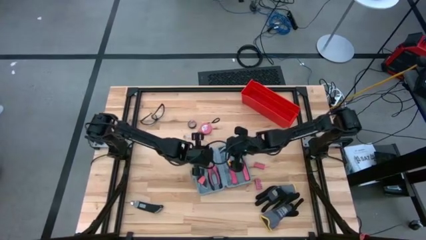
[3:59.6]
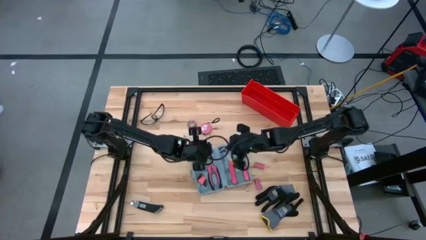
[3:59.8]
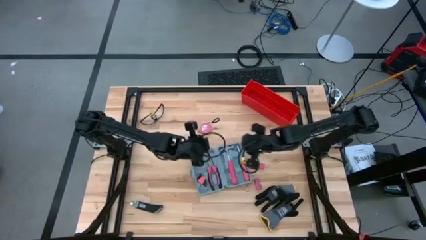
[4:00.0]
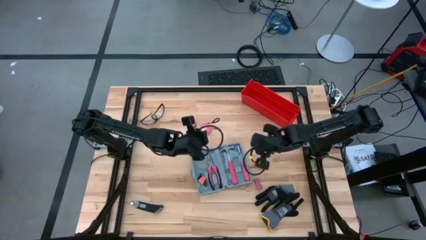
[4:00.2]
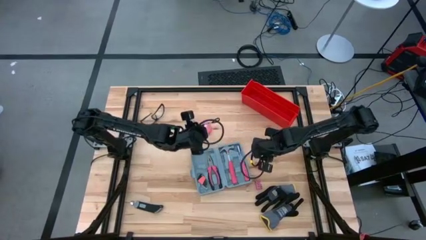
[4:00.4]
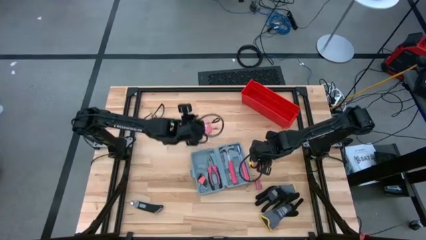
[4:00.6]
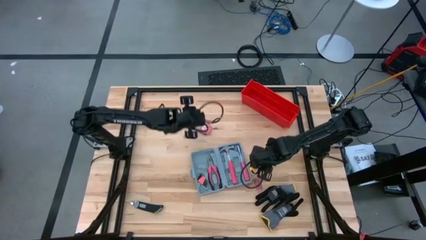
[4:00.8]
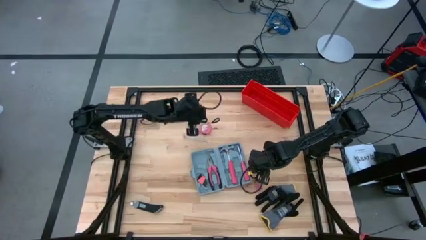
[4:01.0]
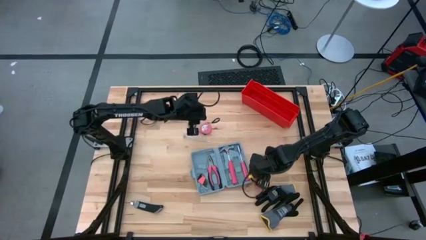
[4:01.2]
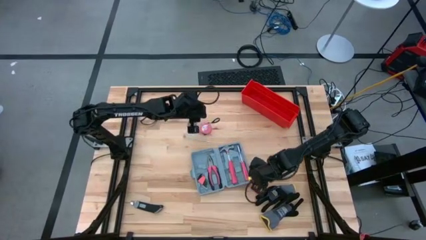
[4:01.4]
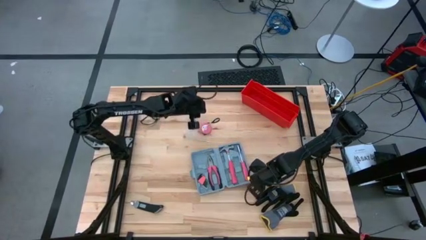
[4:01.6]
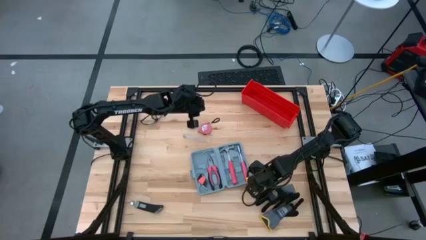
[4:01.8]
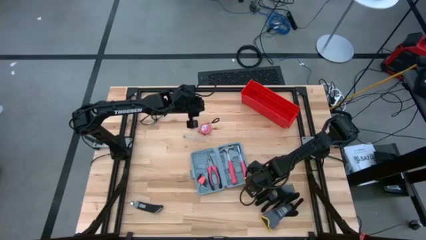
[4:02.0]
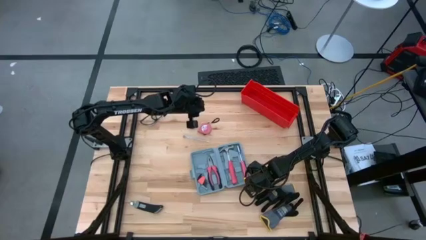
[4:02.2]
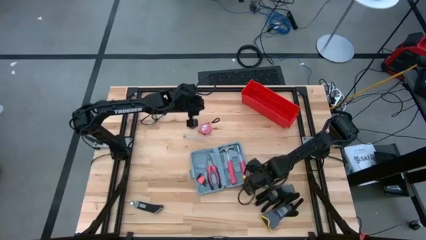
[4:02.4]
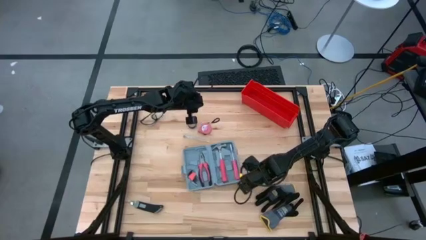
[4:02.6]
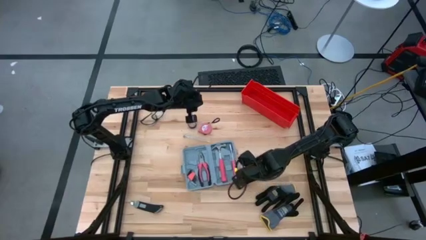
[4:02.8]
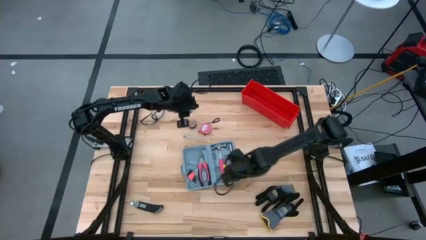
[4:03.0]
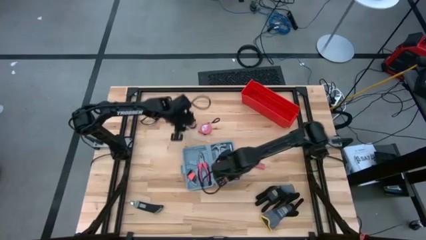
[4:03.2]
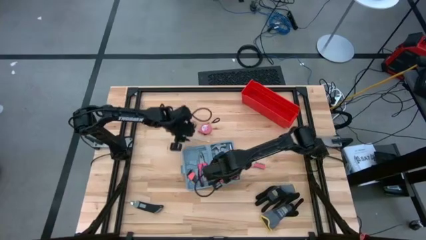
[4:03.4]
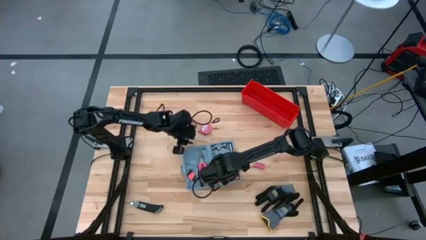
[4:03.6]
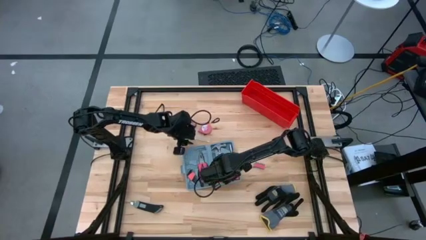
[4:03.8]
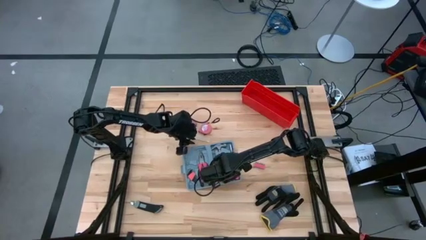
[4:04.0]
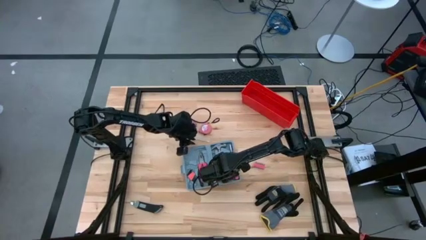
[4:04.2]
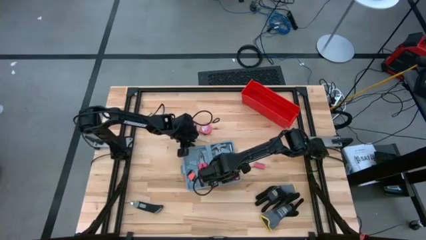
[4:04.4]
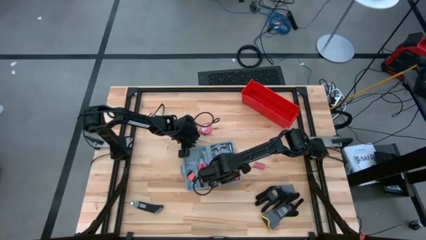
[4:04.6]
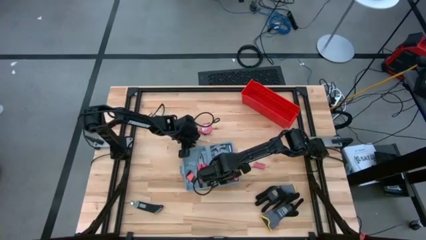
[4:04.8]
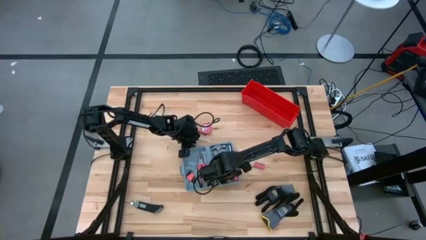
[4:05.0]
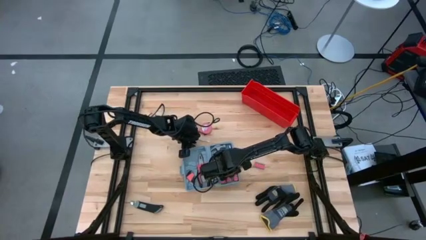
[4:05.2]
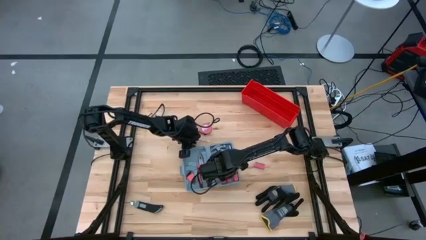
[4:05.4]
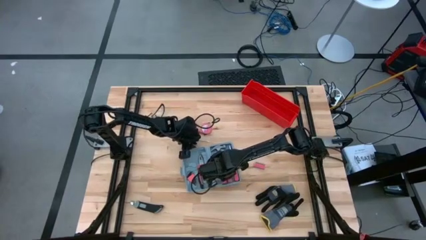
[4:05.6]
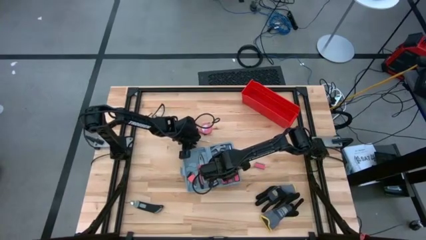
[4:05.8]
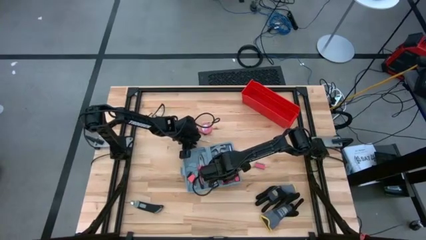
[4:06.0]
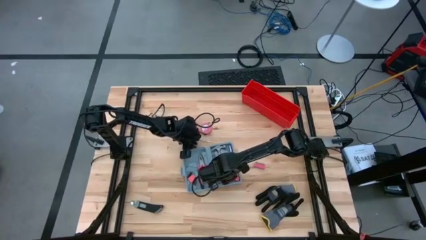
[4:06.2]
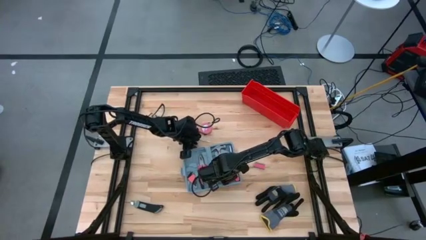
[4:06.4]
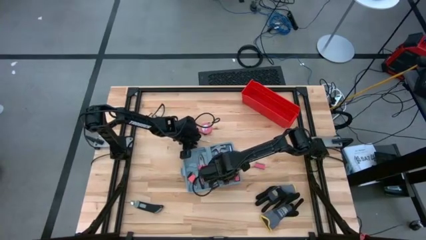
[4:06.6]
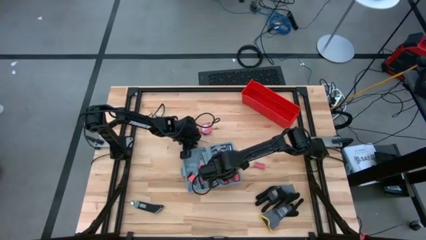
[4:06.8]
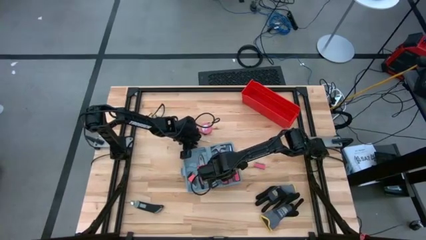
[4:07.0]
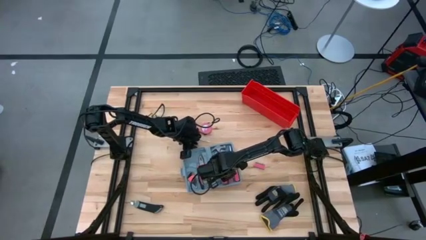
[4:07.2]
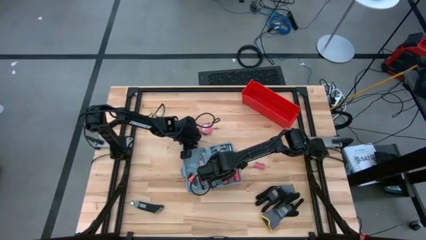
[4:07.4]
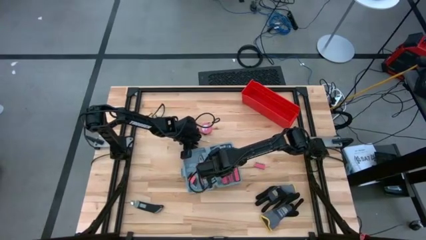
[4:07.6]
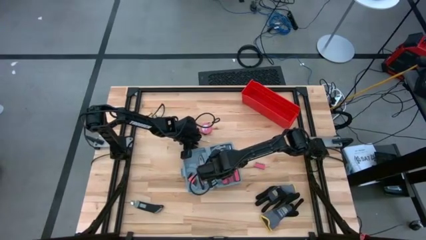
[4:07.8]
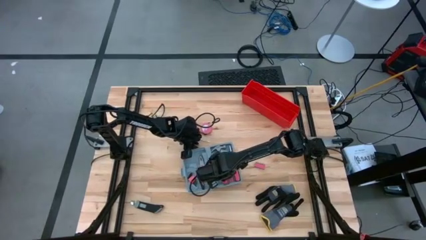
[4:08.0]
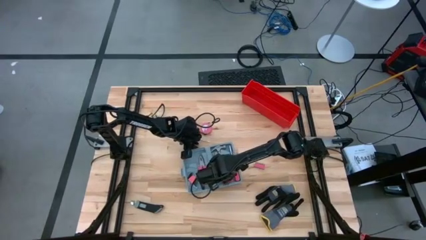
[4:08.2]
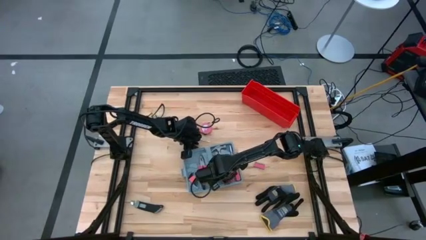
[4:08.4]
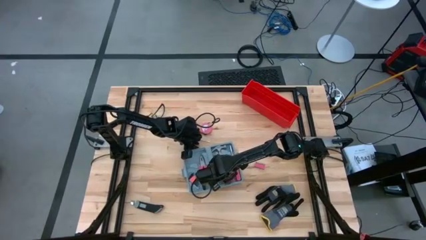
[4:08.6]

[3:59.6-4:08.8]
Task: prefit tool cases
Put the screwdriver bits into the toolbox

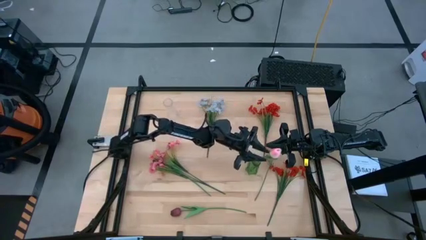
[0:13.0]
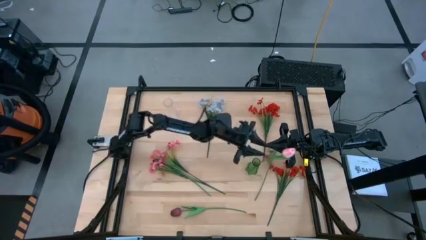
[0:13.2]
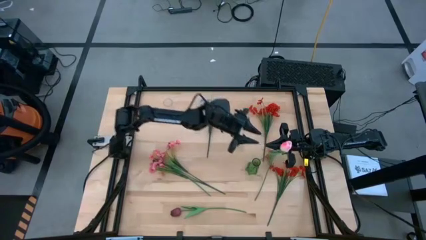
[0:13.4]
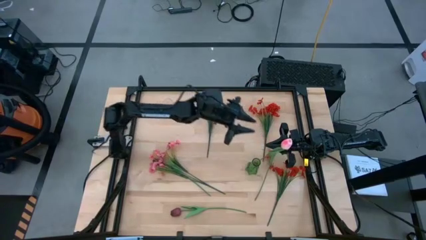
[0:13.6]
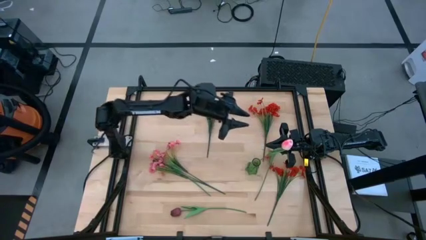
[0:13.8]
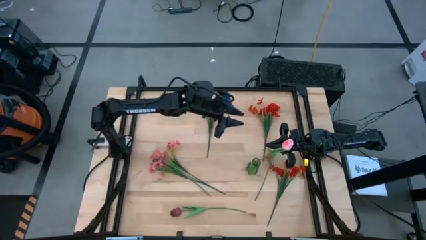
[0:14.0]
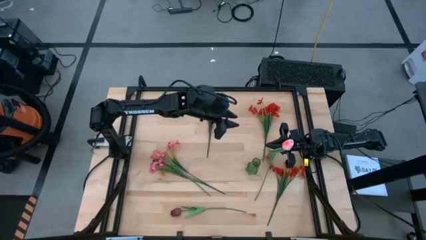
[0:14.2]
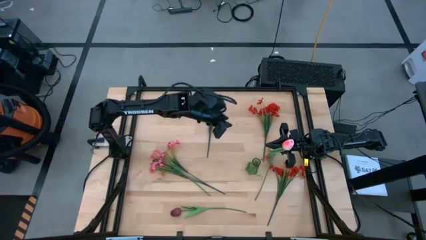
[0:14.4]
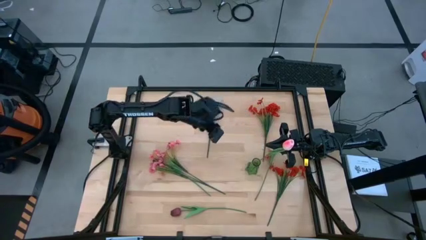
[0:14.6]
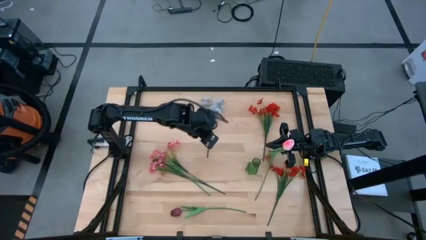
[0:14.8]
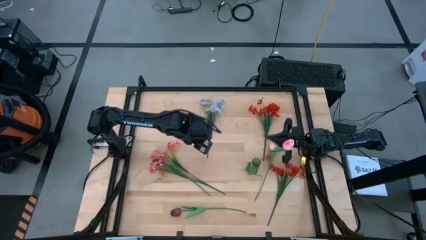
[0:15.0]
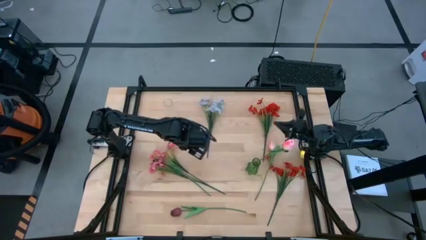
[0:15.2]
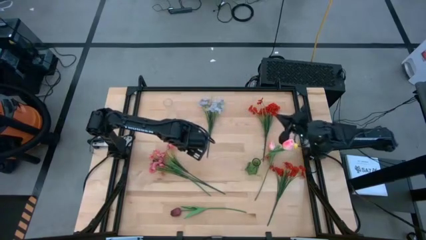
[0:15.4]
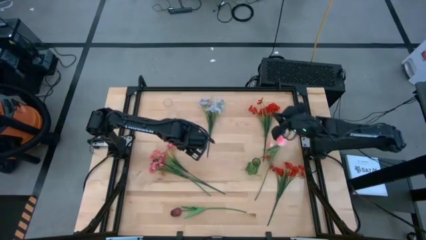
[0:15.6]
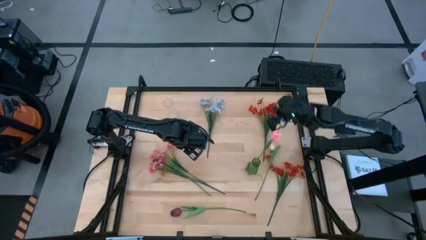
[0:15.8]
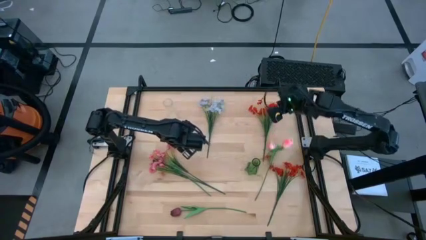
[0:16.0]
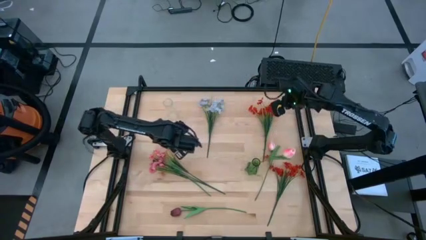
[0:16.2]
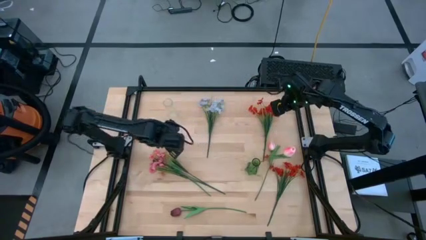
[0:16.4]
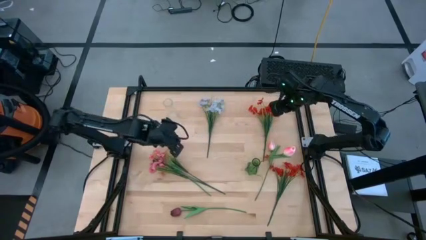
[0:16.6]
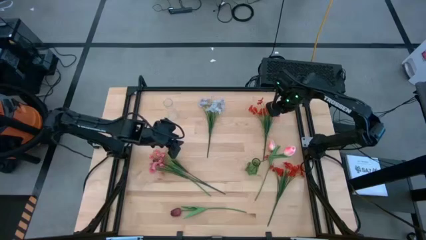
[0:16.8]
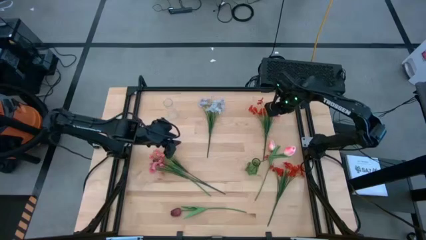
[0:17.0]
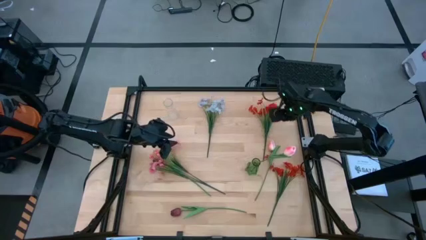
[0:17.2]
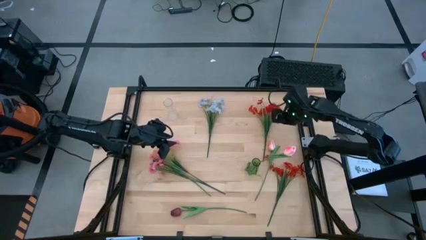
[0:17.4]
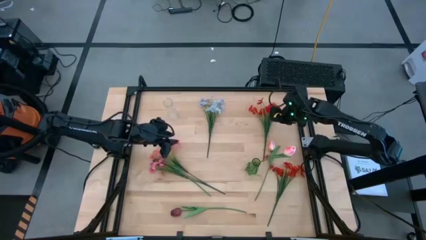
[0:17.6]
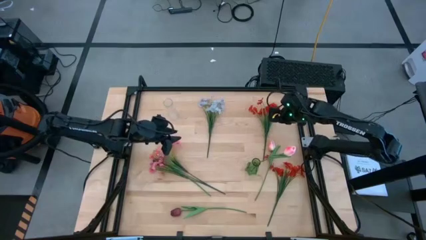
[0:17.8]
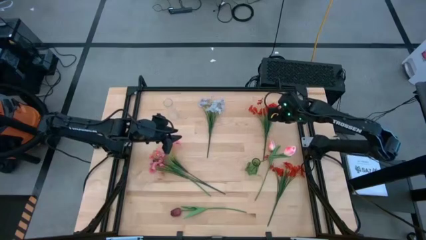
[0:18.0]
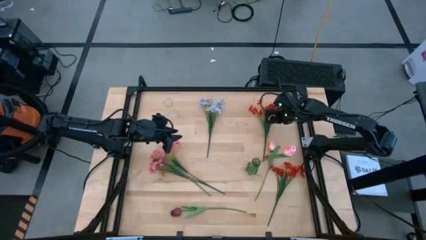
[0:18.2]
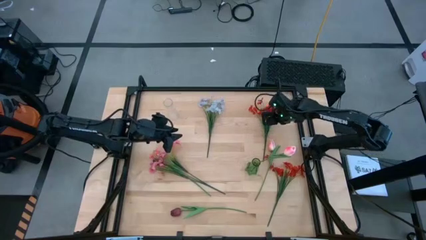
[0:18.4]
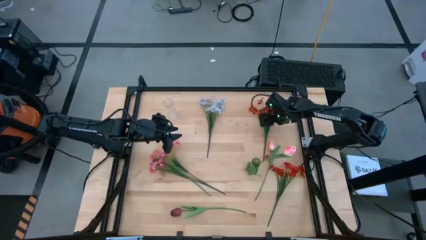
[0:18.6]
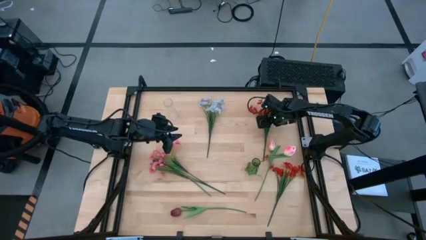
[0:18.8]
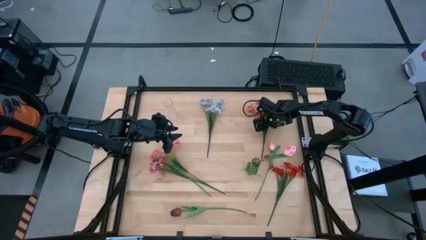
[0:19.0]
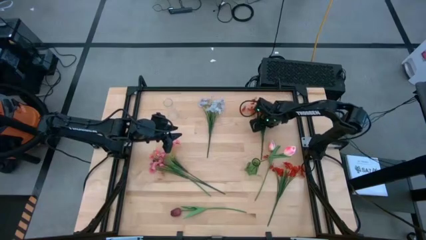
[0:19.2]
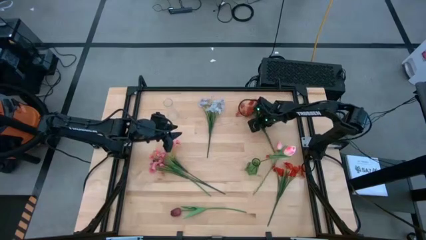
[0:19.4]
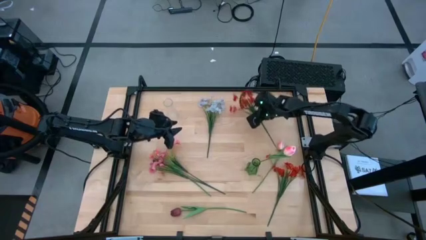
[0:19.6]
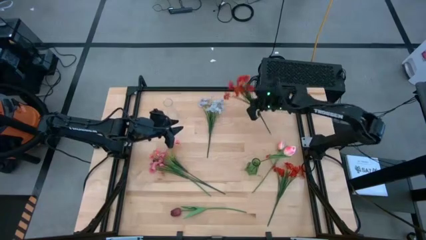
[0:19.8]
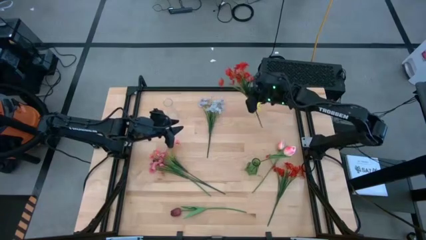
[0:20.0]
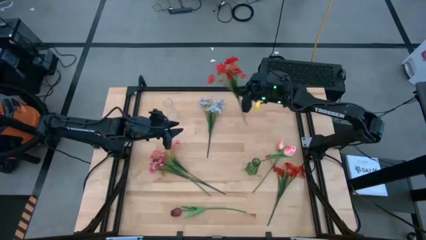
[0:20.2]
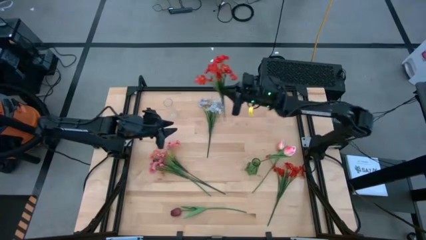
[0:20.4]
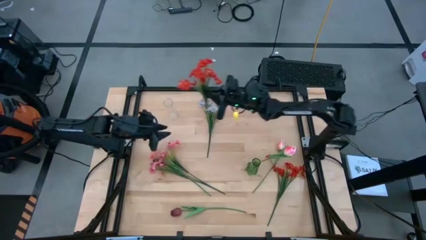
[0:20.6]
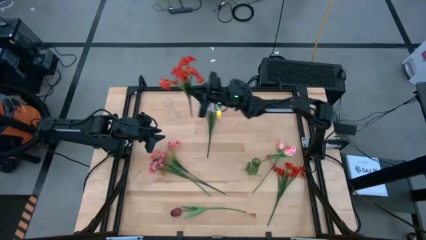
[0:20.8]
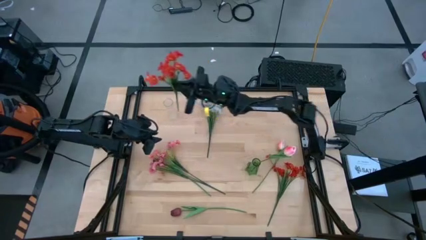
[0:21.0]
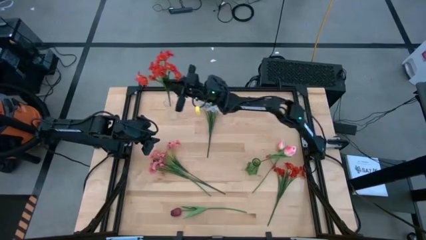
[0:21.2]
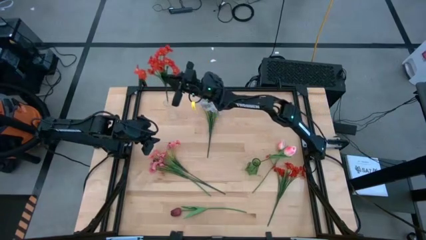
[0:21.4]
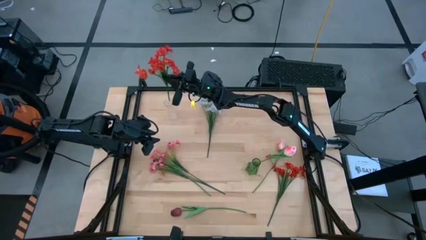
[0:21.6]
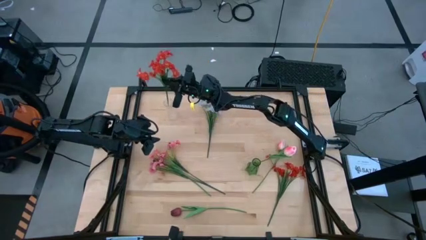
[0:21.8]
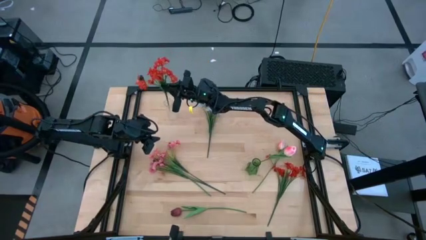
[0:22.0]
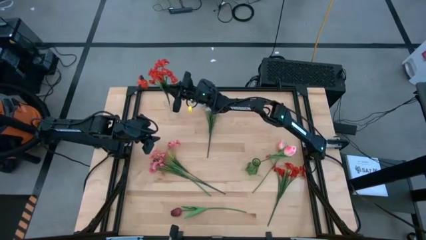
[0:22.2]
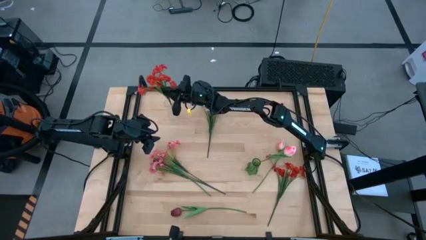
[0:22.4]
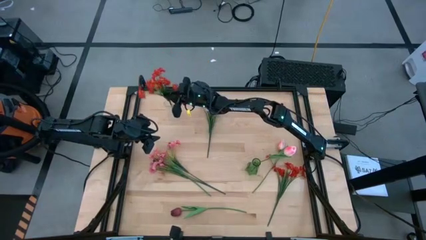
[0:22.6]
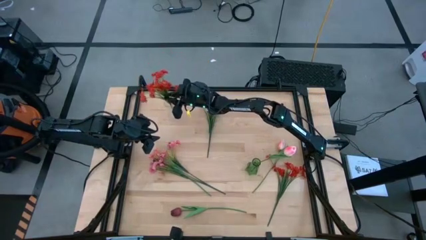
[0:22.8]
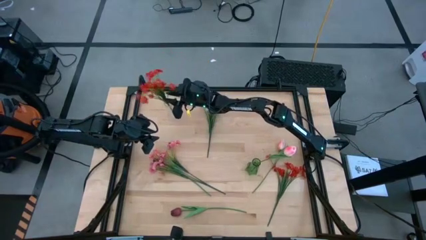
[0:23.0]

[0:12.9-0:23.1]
Task: Sort flowers into vase by color
Put the top red flowers into the transparent vase
